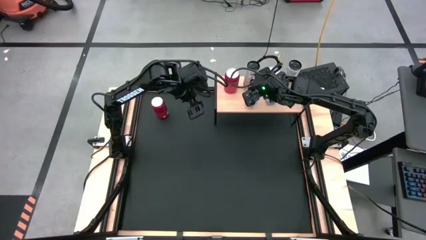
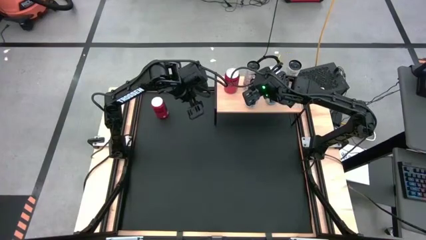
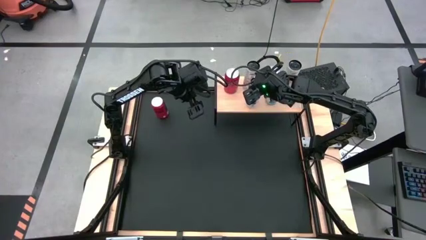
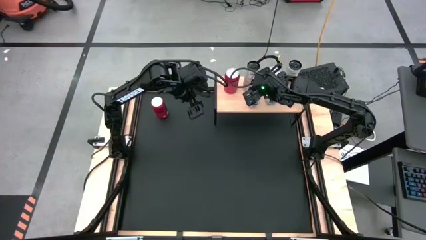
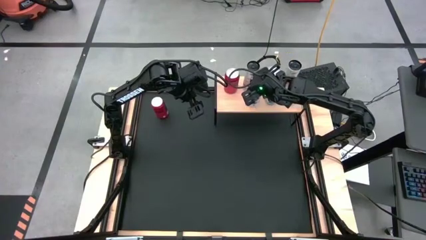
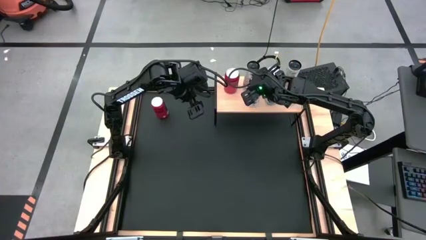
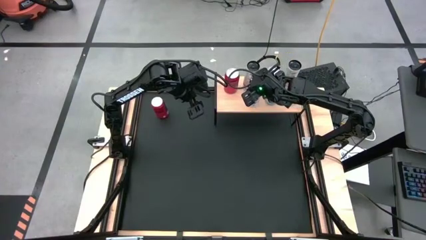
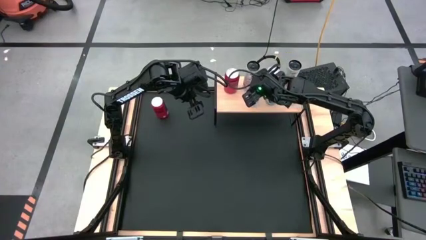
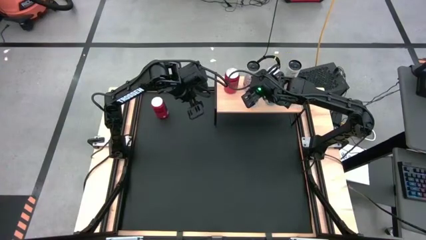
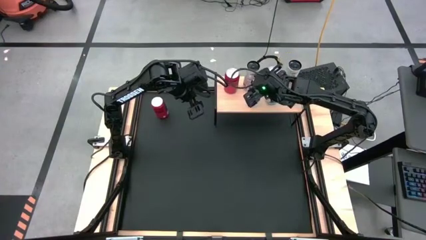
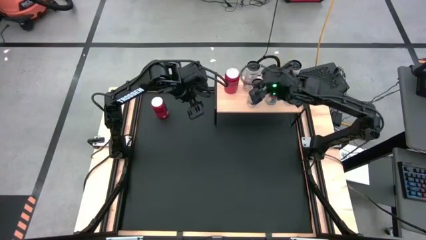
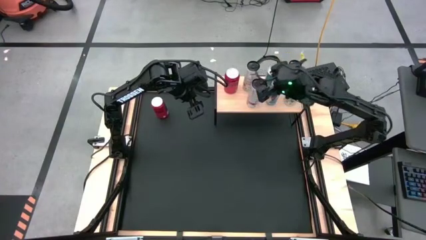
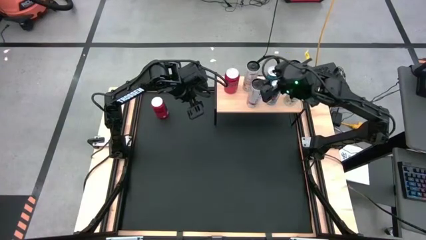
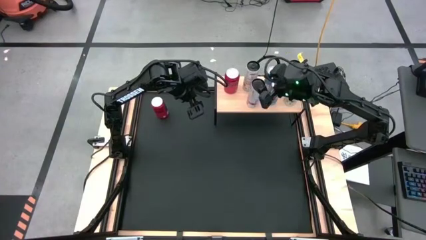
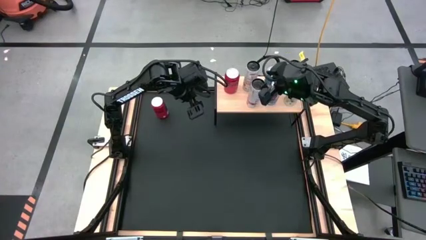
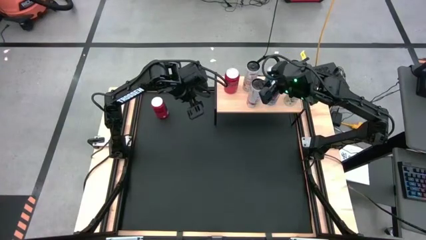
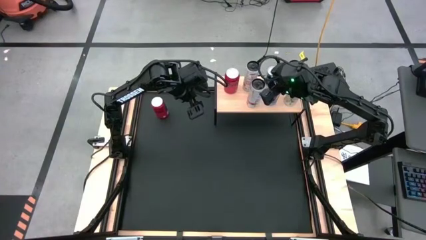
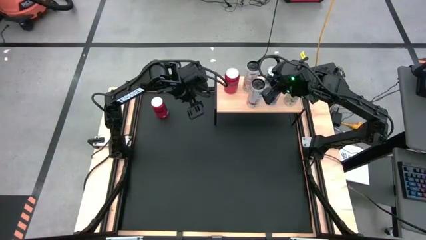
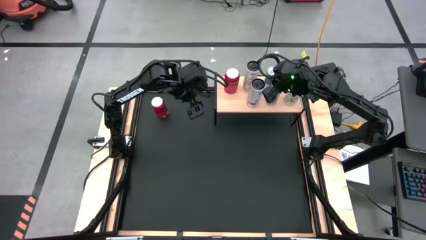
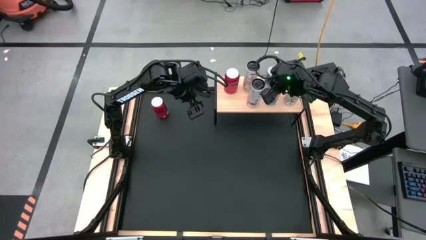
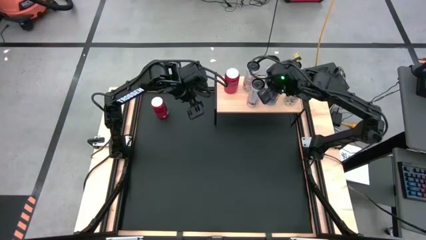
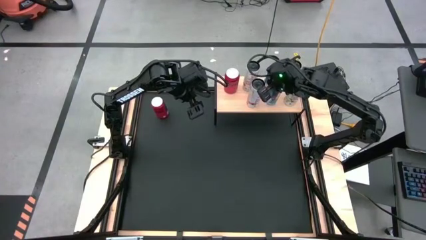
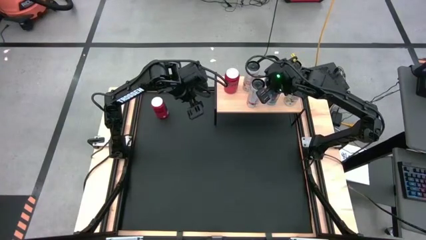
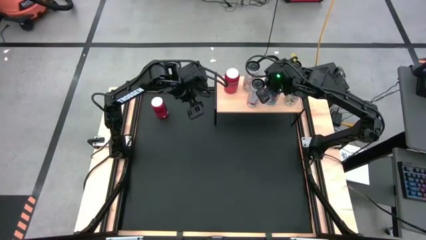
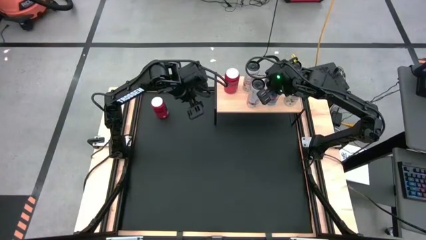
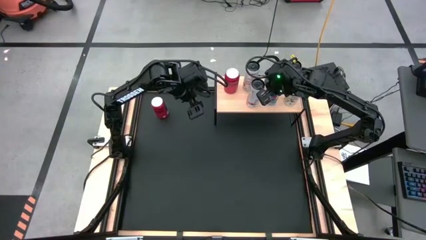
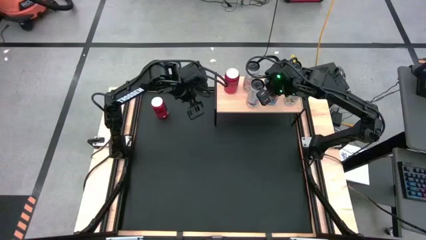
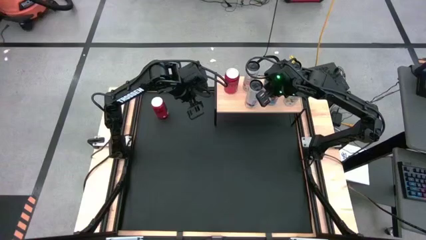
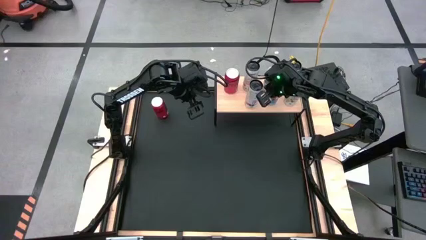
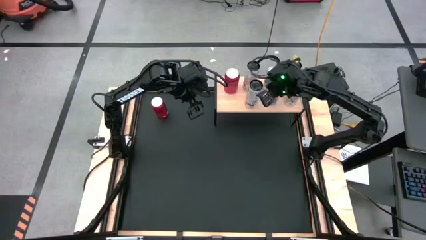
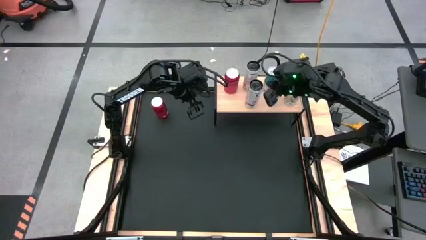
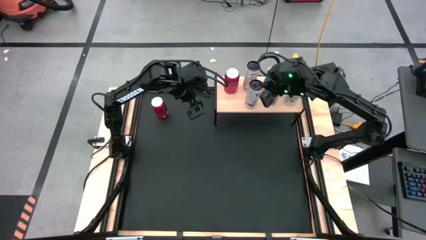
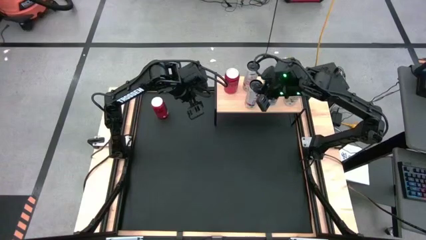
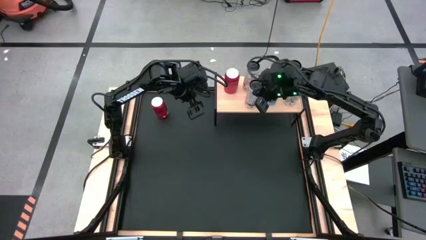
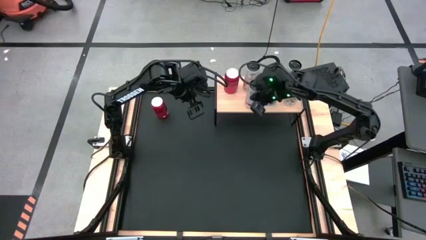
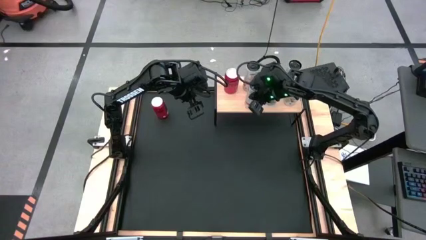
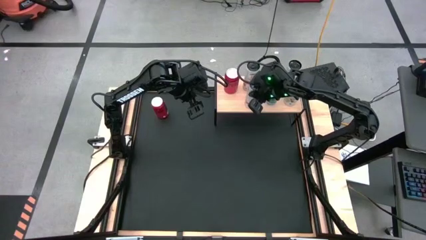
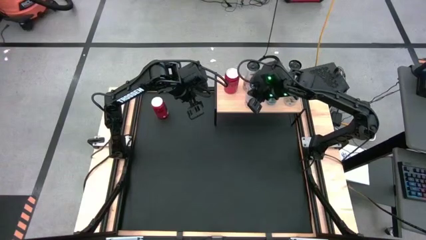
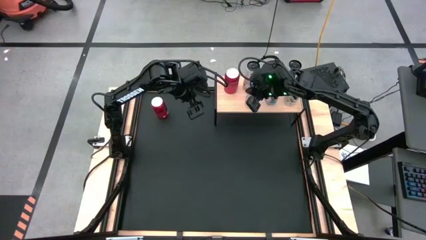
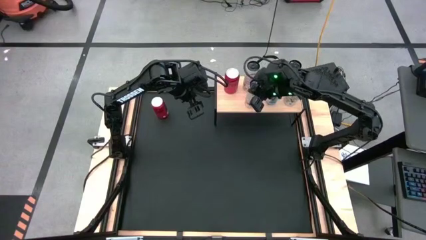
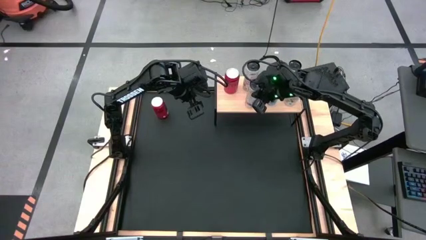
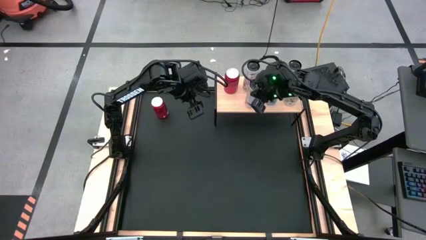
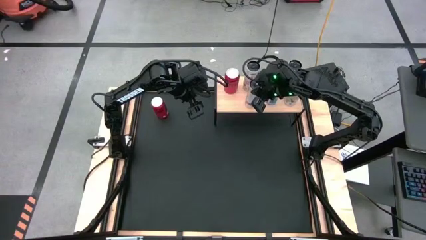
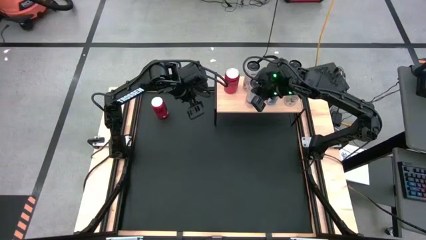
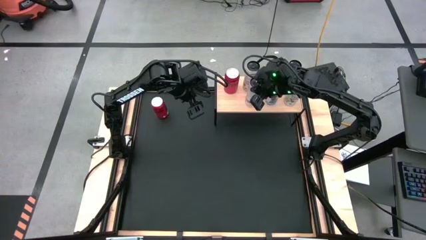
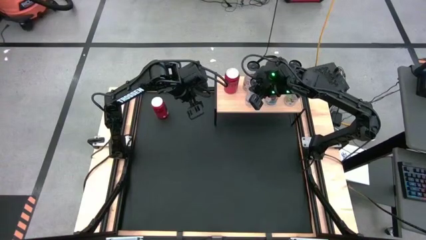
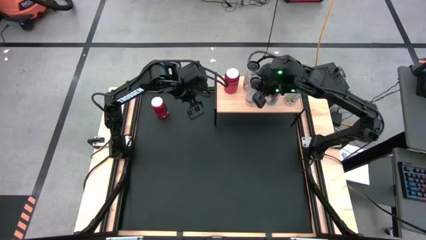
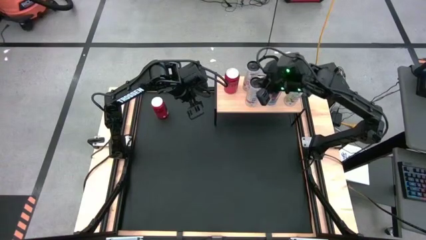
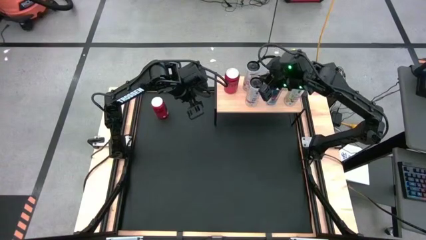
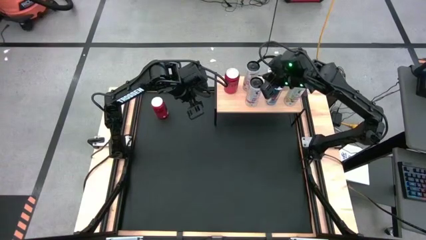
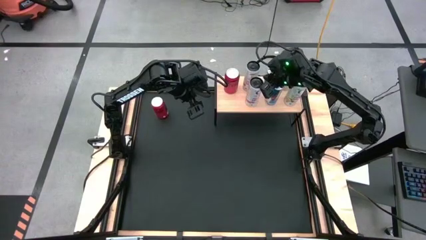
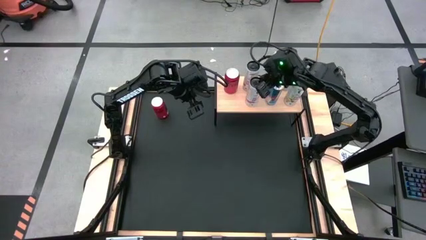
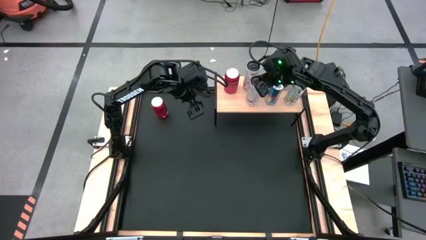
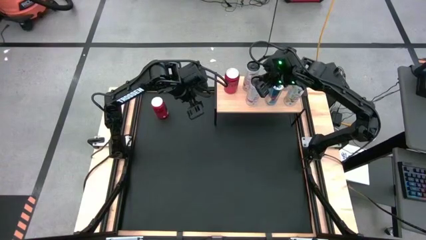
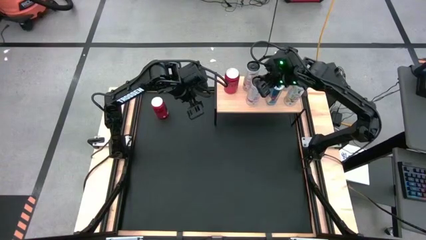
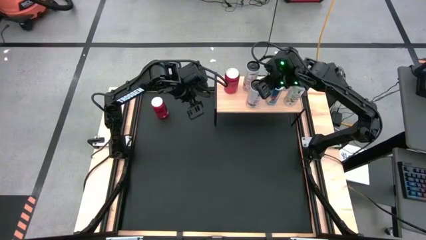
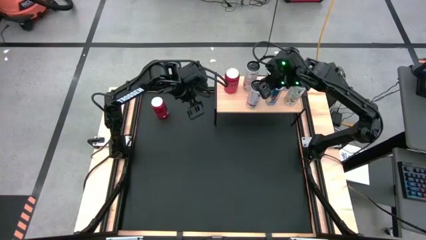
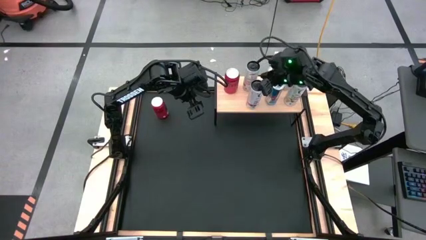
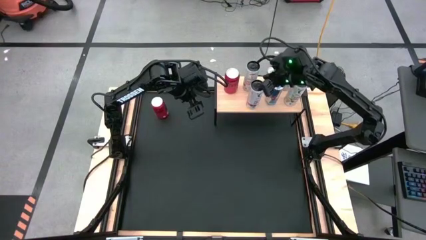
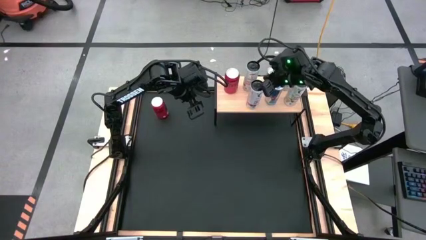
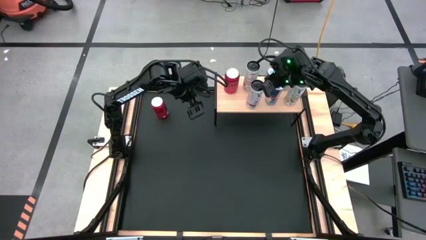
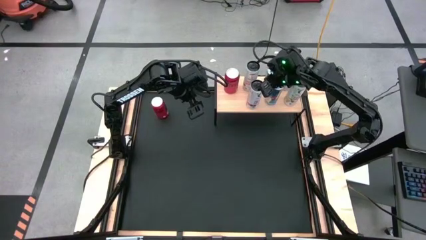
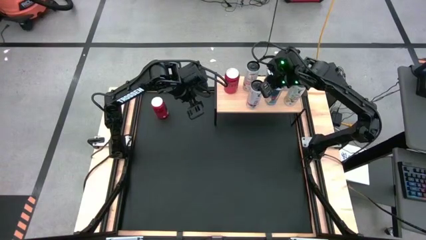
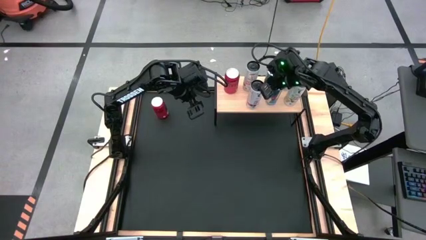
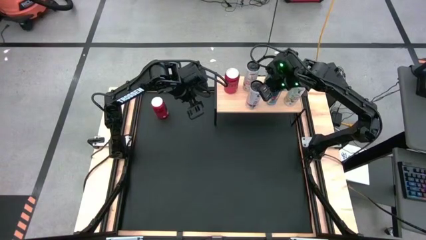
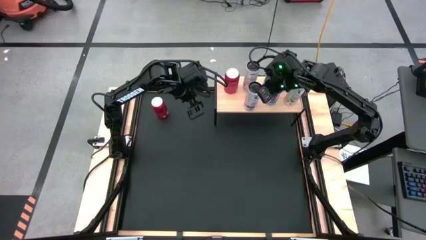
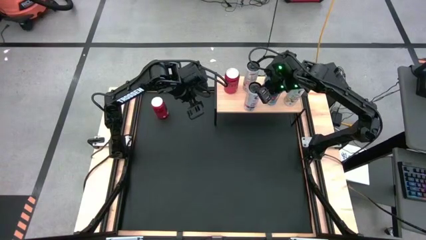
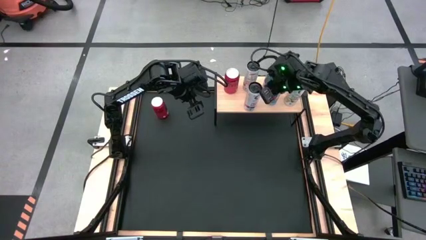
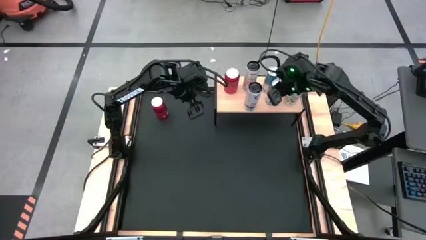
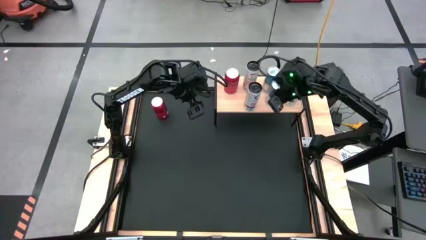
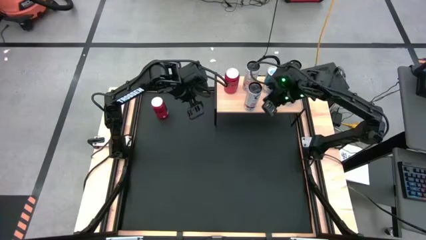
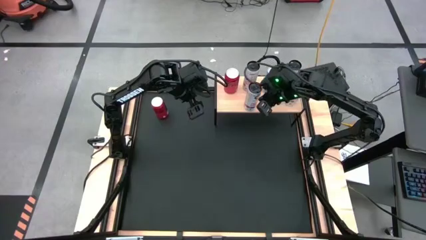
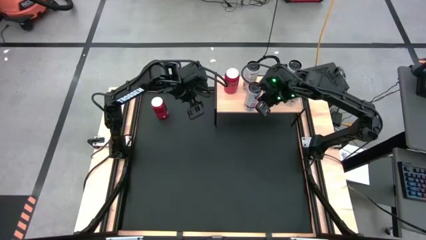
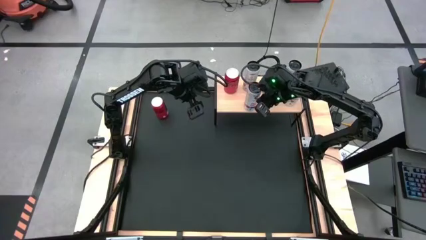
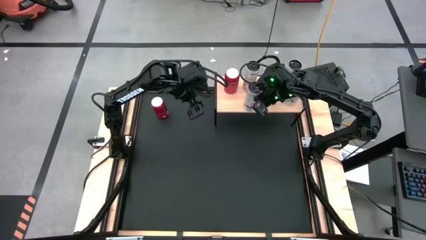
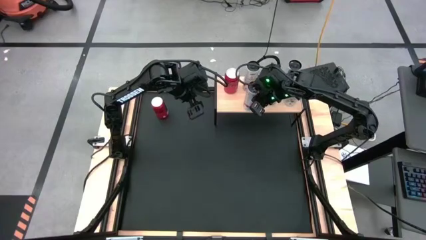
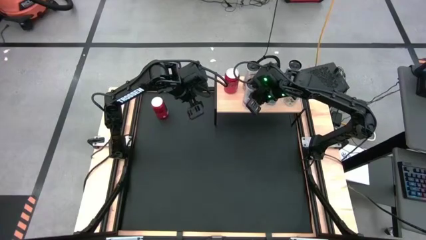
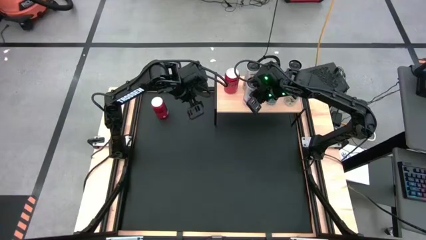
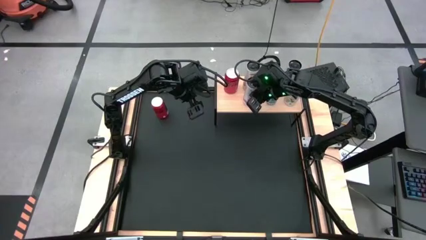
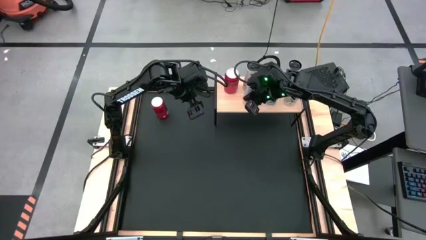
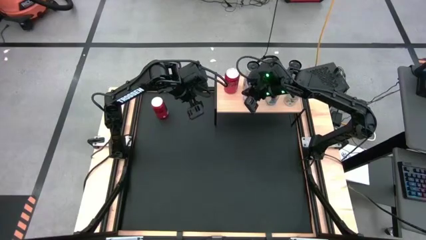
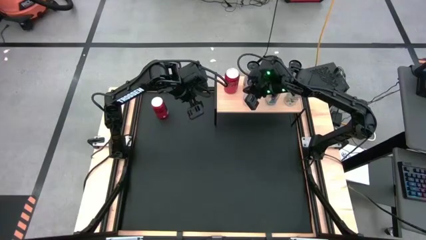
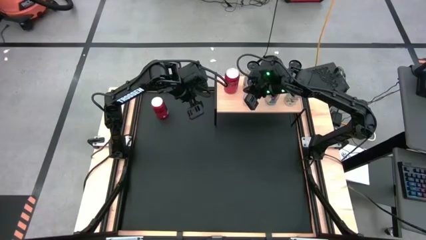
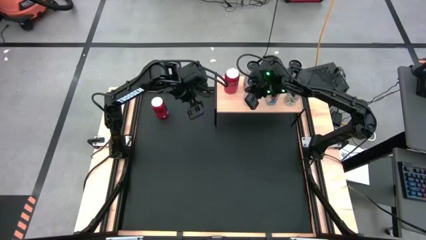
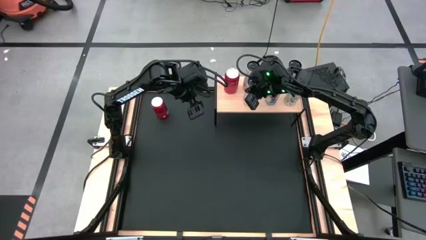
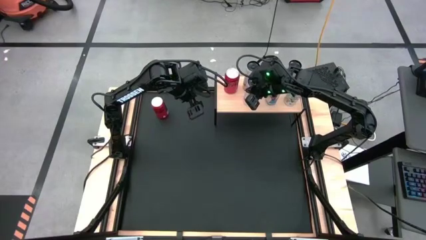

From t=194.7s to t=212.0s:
Task: Place canned beverage on shelf
Put the white-pink soda can on the shelf aligned with the other white-pink soda can
